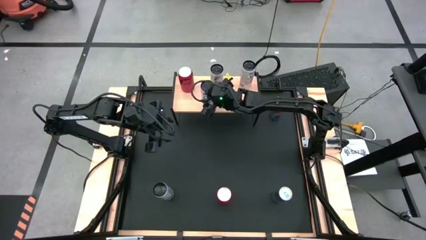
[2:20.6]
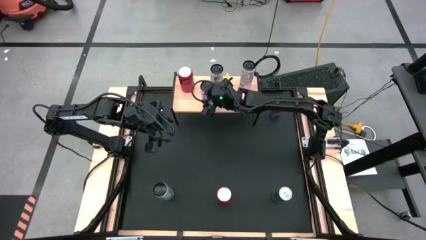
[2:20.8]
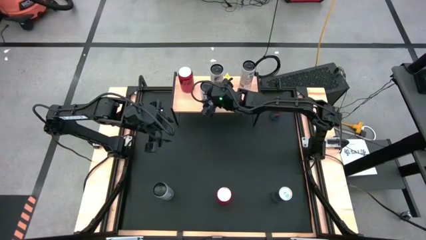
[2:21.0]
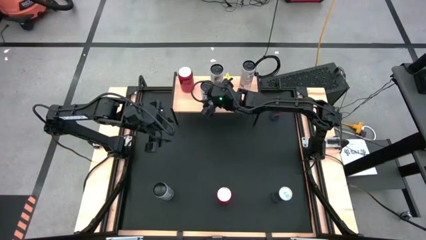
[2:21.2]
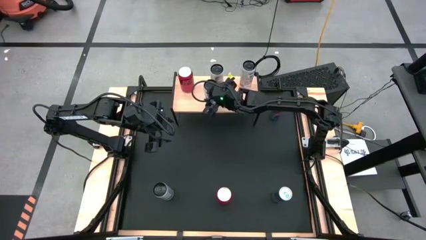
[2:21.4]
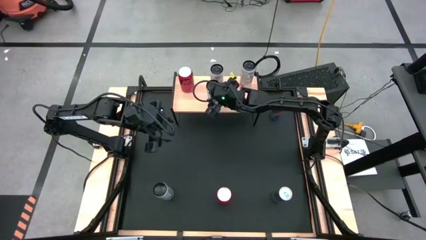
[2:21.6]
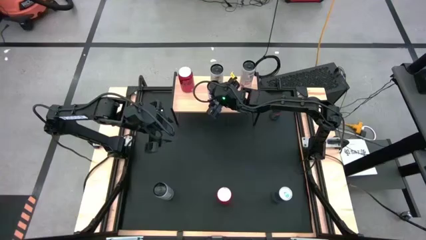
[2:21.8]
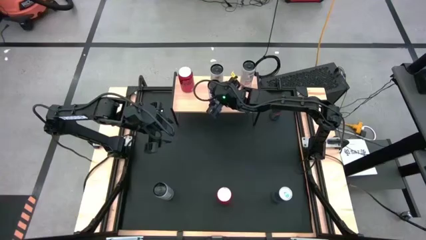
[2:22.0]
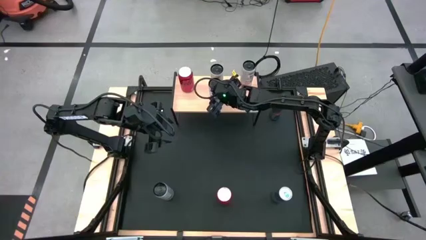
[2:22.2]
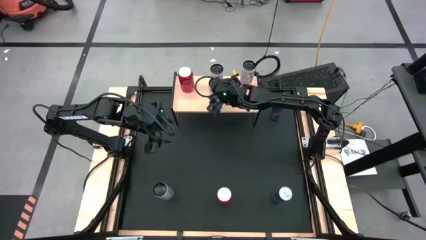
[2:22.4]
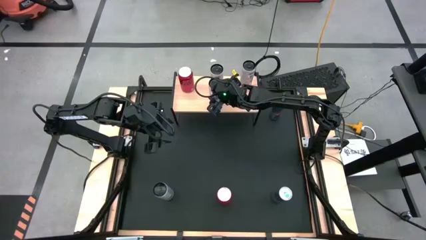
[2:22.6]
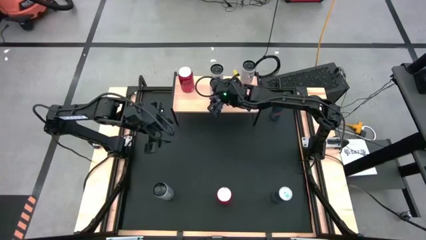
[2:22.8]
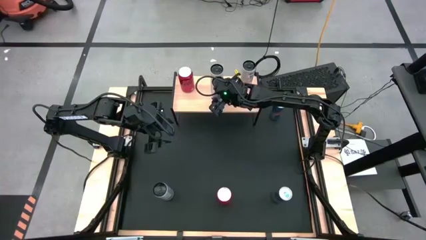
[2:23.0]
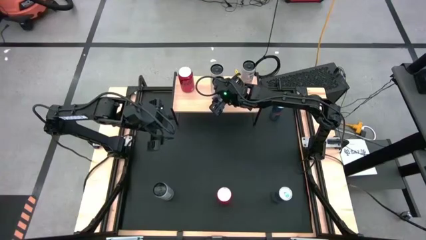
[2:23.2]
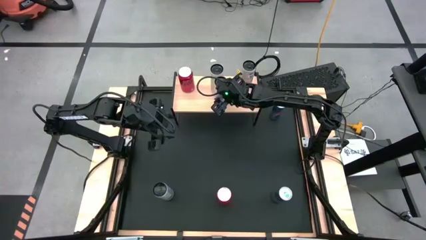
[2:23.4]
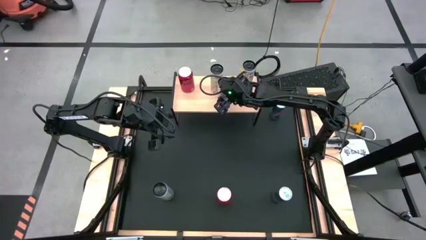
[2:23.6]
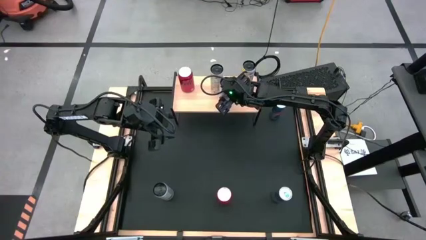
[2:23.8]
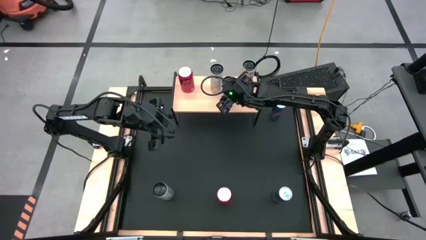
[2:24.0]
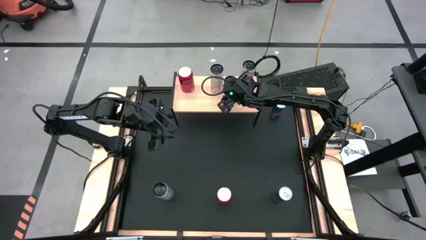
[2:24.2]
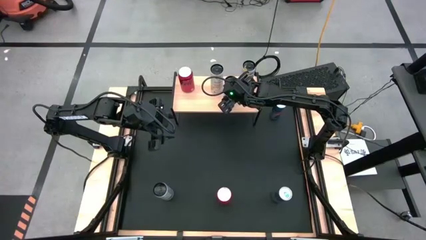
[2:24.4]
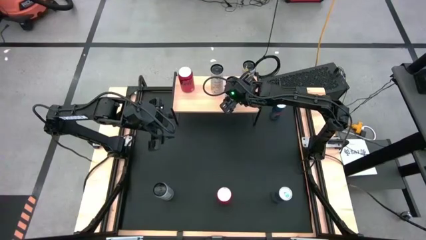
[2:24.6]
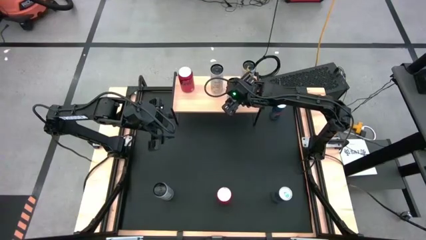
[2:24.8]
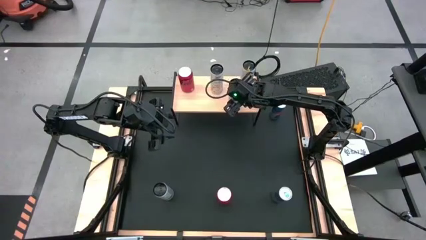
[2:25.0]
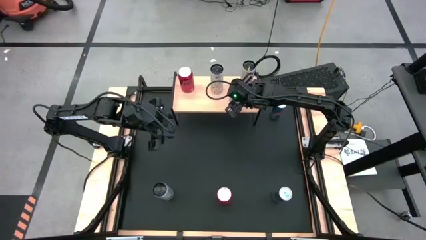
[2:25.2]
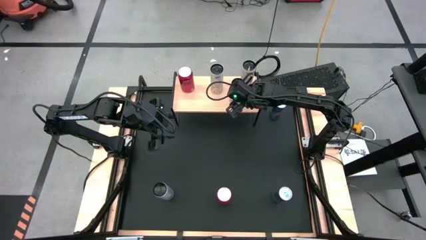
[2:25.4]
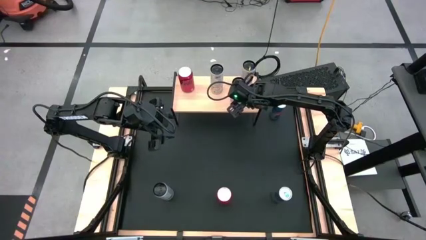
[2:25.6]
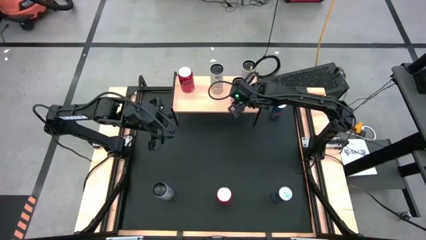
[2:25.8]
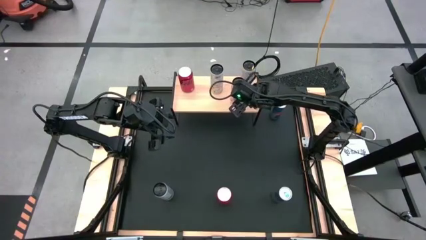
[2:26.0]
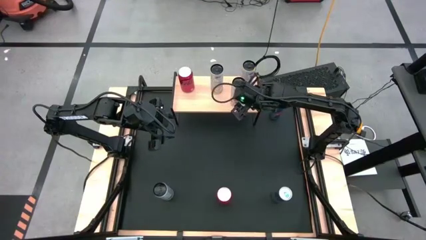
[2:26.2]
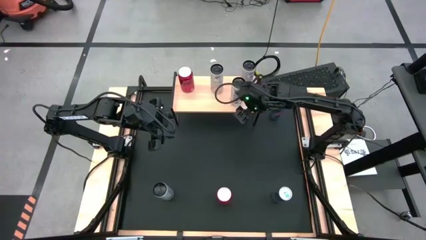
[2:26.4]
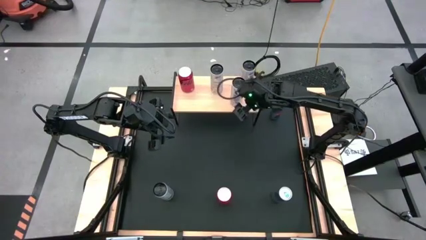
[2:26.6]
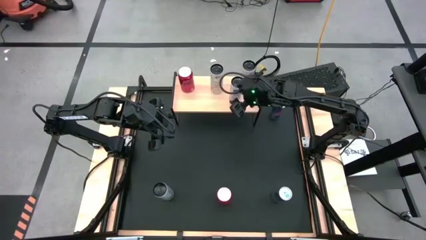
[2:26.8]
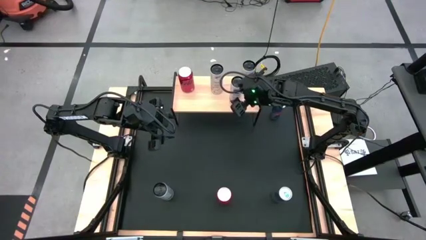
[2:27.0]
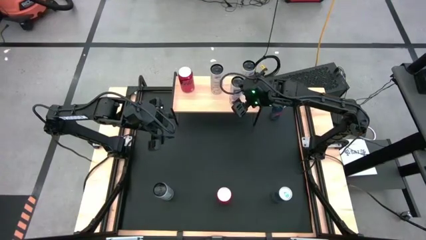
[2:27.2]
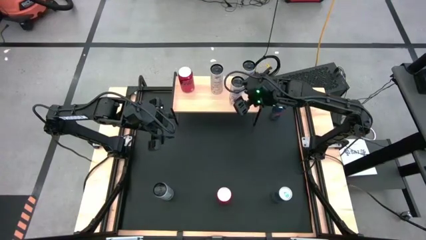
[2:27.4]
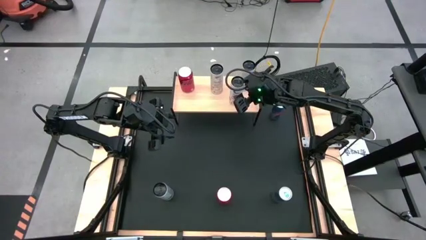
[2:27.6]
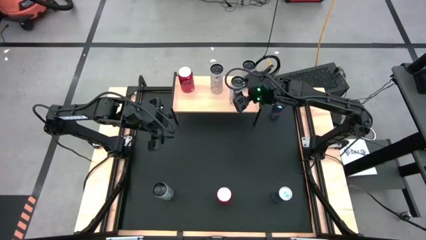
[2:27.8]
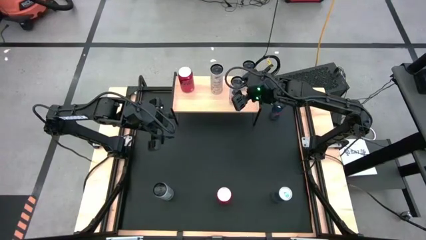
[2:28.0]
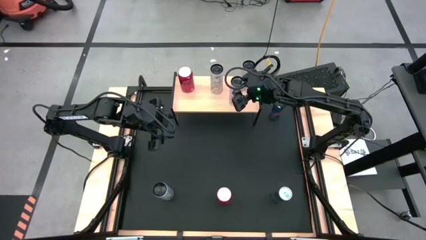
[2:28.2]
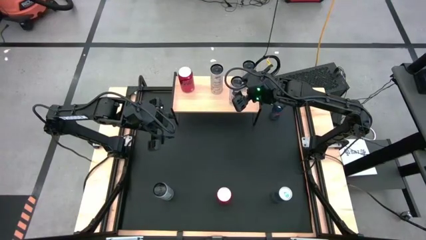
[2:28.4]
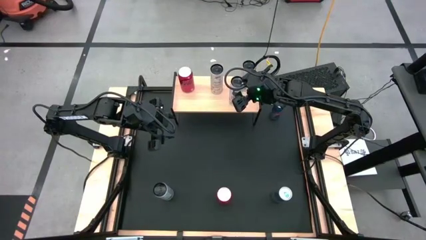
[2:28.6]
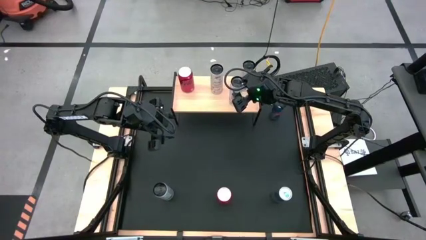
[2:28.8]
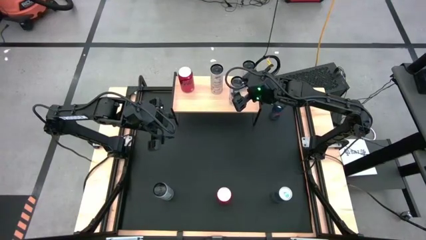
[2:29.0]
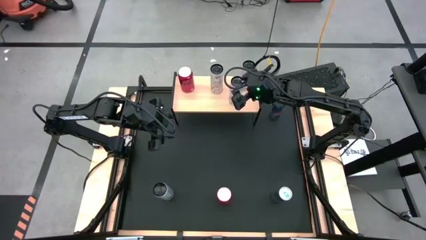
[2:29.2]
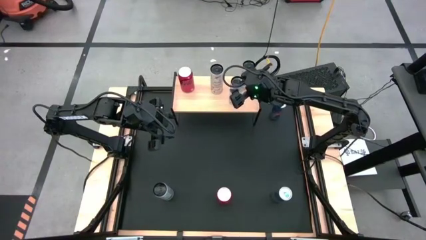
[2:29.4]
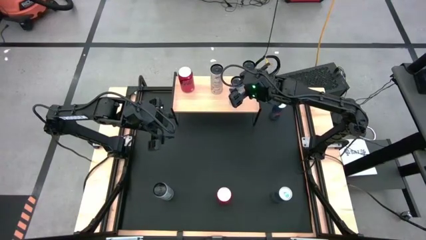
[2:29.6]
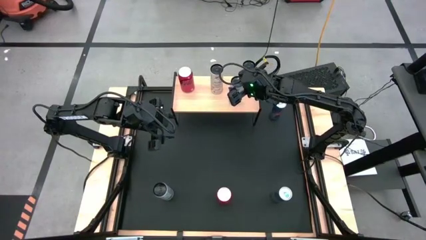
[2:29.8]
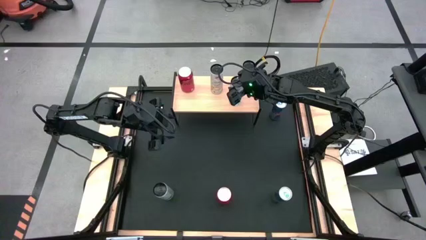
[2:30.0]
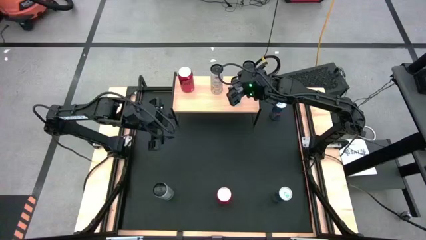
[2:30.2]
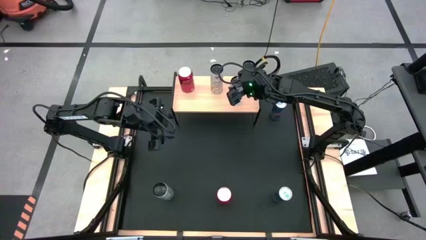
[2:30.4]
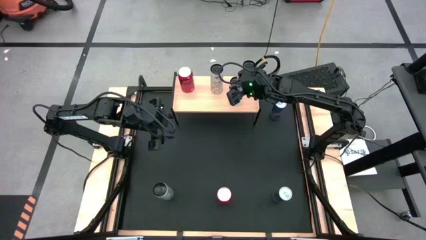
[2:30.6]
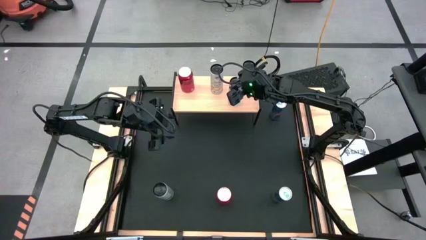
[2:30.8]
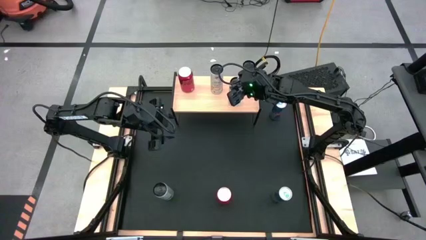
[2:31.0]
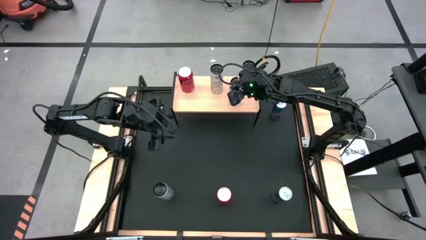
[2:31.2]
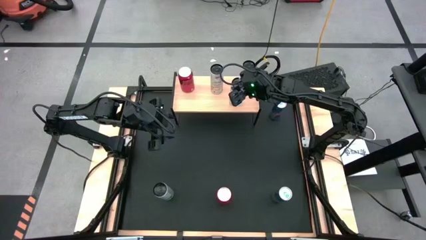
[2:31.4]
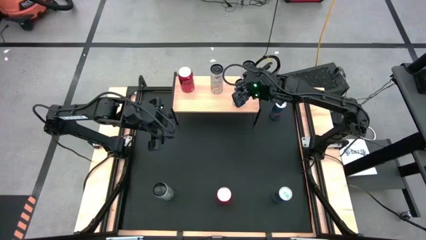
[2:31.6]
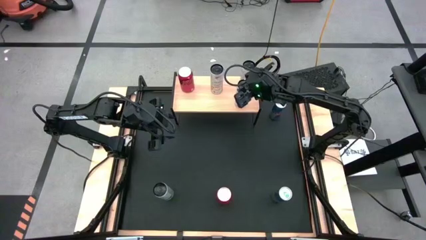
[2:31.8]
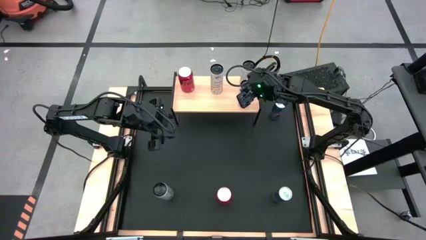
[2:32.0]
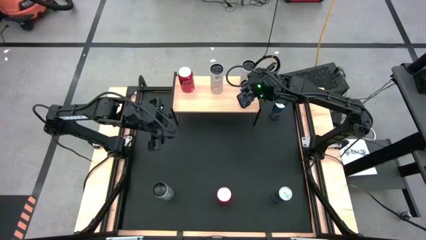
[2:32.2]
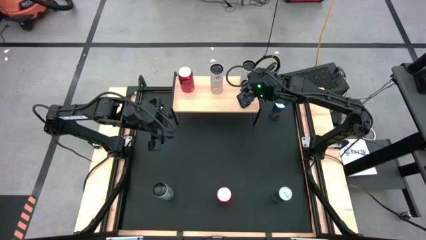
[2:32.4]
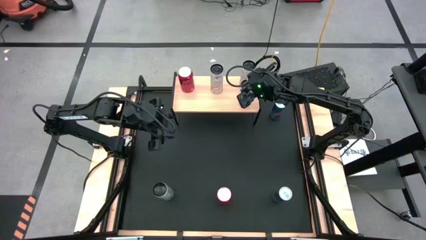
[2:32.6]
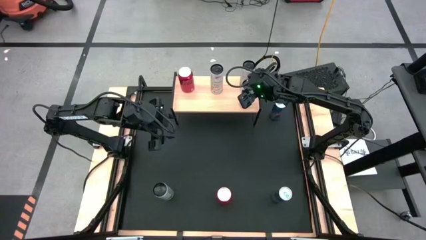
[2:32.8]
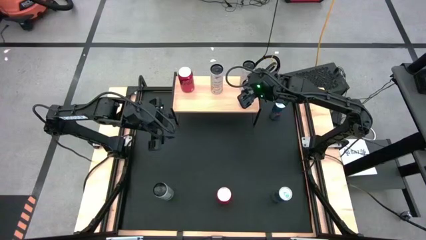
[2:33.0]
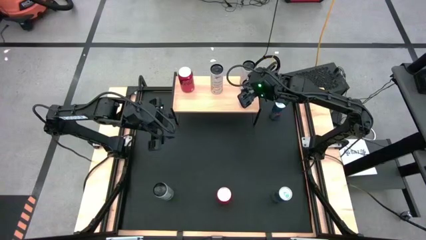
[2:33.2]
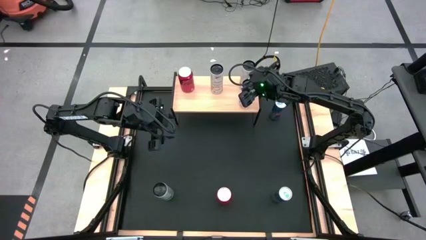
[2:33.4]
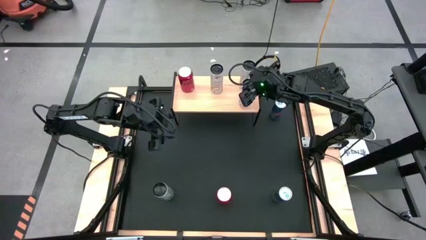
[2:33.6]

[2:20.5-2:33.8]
Task: Place canned beverage on shelf
Put the white pink soda can on the shelf aligned with the other white pink soda can

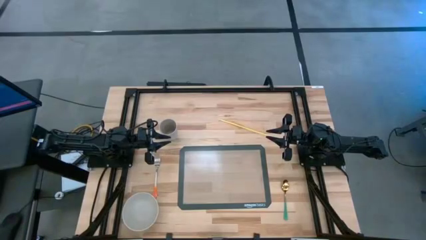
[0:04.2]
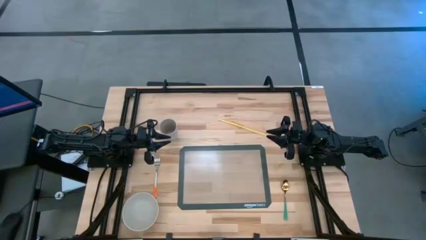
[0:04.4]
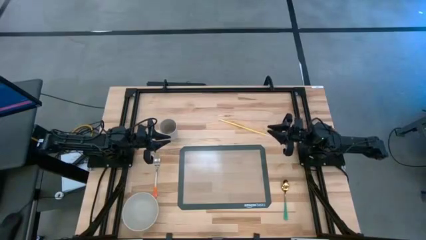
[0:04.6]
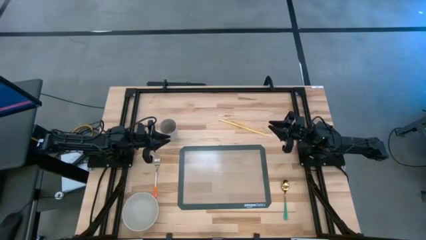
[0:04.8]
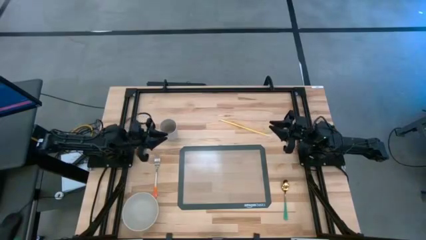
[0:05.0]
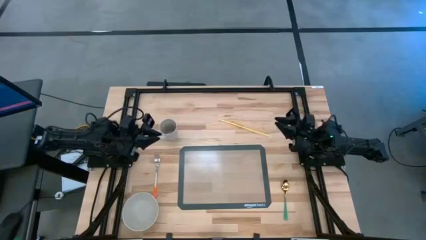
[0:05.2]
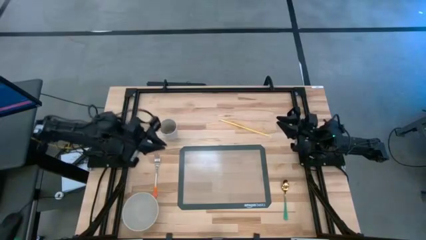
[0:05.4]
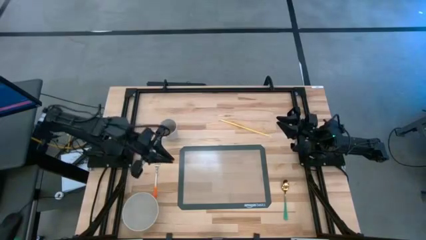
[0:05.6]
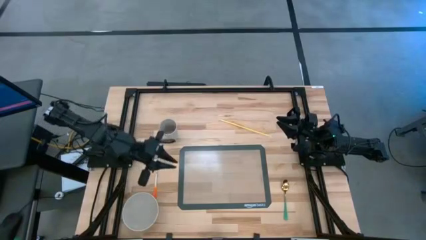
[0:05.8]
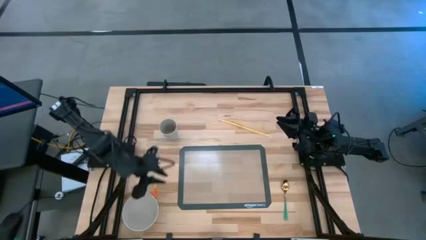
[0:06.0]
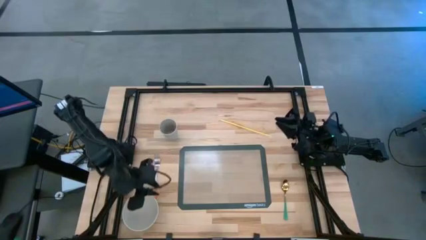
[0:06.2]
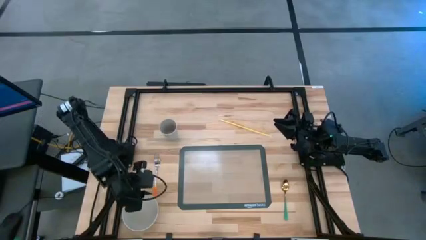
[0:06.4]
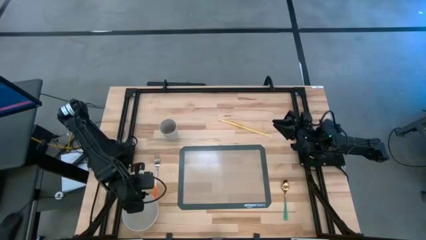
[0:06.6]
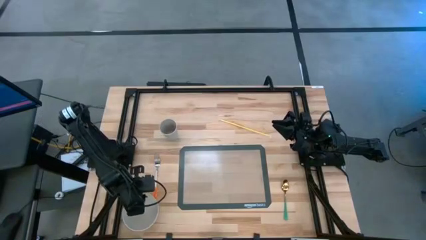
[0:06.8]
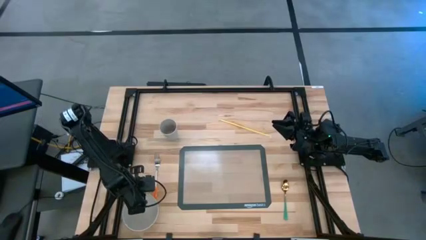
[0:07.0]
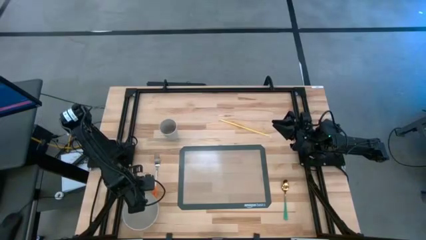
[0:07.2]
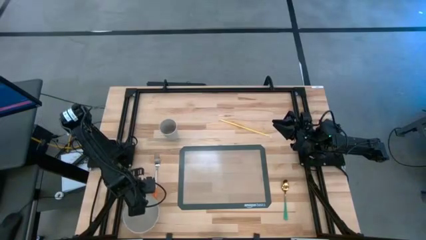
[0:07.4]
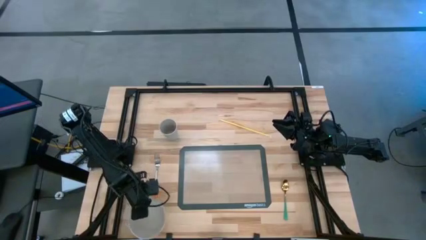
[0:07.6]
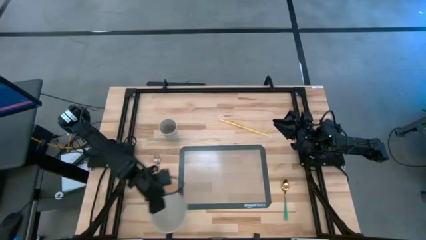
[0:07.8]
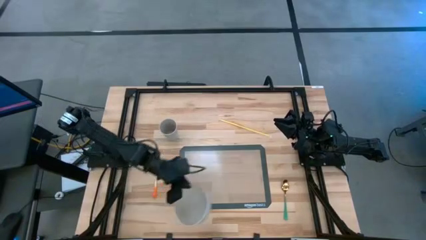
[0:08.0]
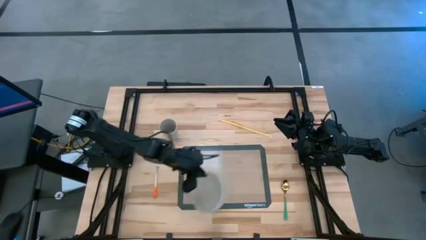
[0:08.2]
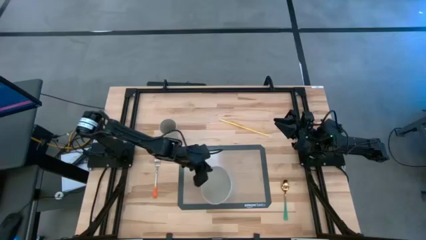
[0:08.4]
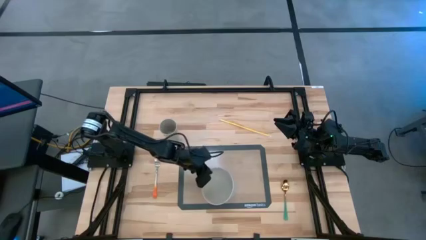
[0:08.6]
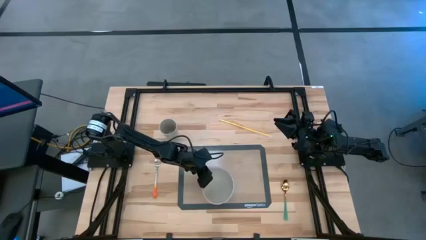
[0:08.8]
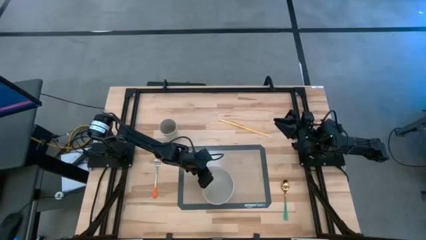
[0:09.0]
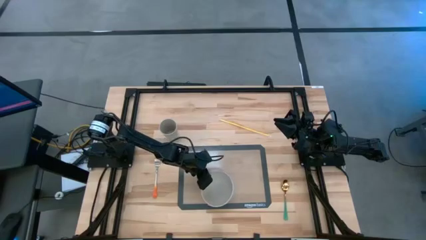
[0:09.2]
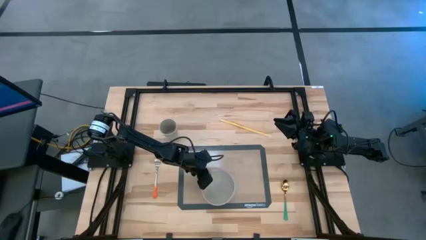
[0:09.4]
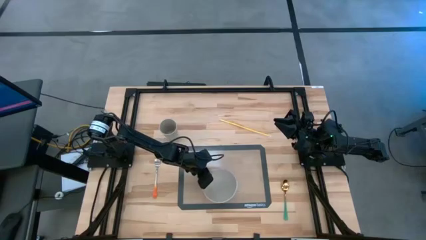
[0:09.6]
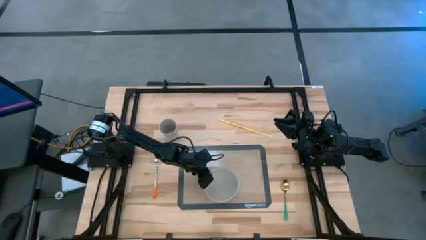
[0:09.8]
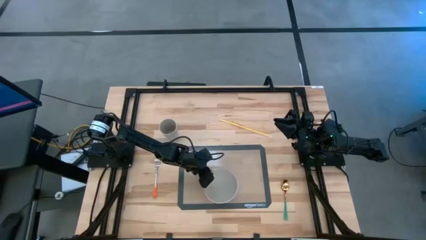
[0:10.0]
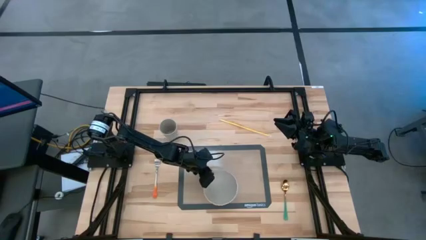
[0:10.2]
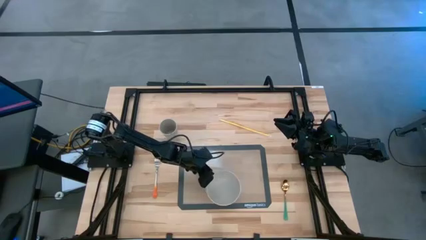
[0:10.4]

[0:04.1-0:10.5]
Task: Pick & Place Utensil
Put the bowl on the bottom middle of the silicone mat
